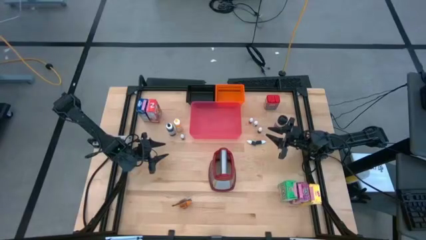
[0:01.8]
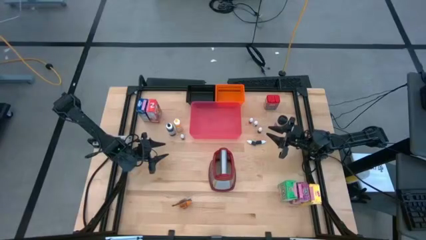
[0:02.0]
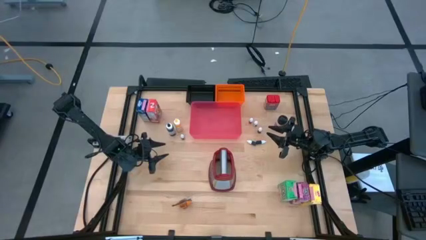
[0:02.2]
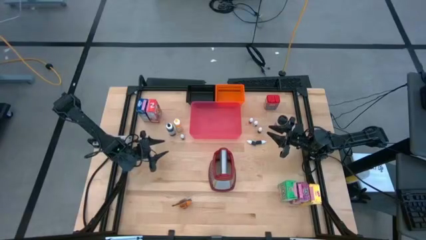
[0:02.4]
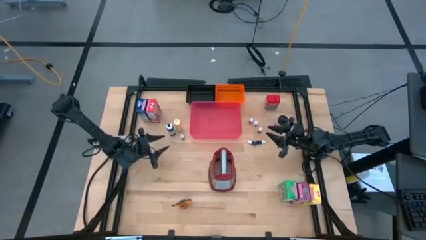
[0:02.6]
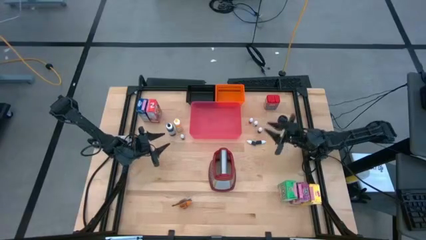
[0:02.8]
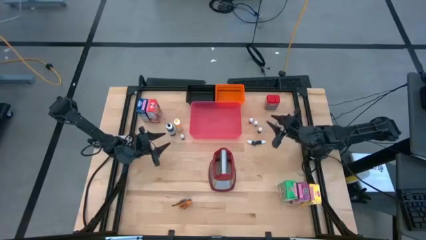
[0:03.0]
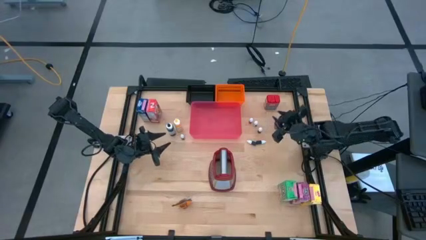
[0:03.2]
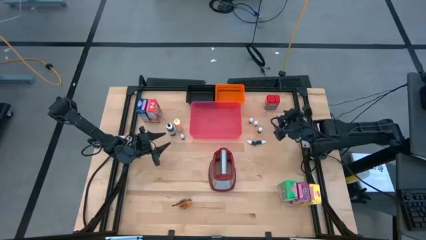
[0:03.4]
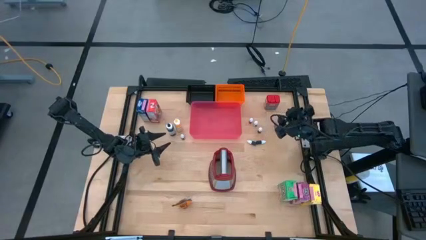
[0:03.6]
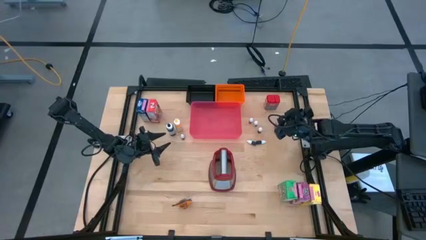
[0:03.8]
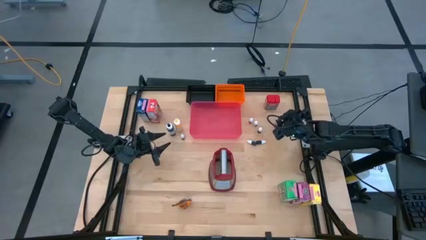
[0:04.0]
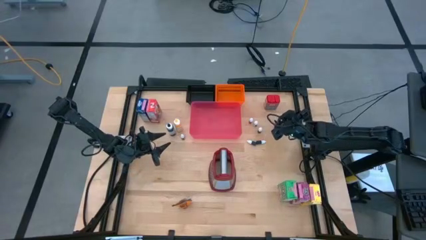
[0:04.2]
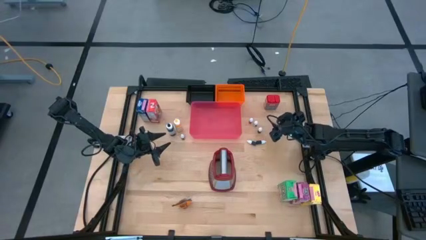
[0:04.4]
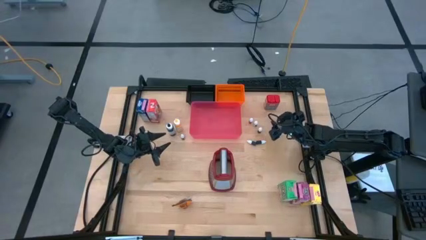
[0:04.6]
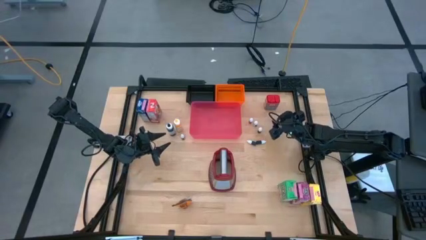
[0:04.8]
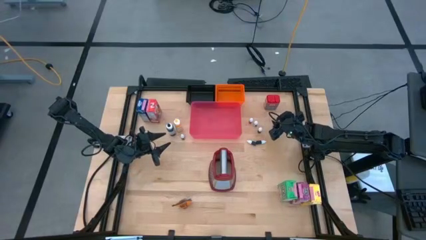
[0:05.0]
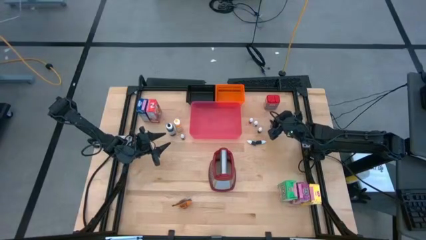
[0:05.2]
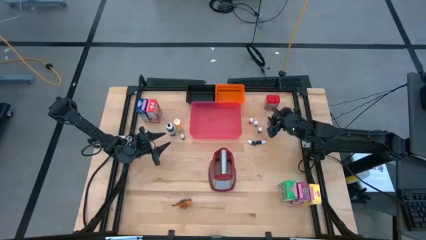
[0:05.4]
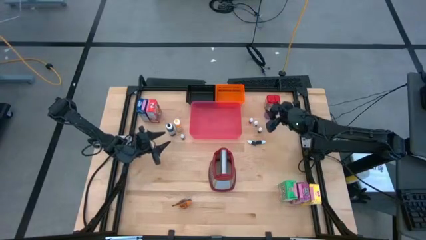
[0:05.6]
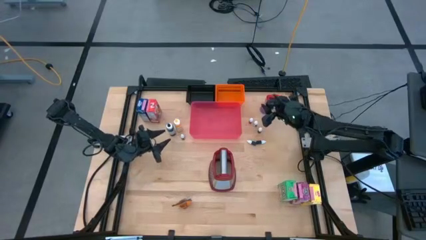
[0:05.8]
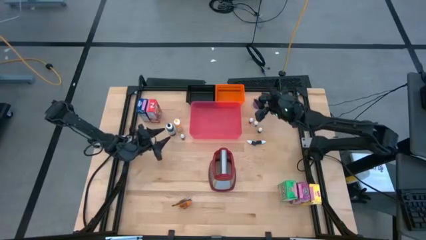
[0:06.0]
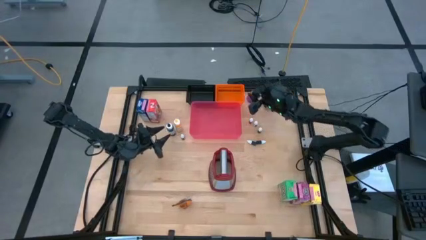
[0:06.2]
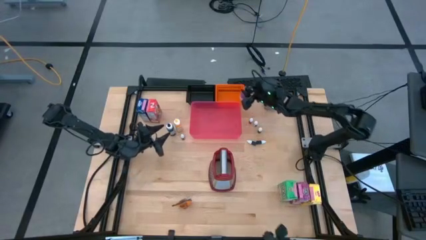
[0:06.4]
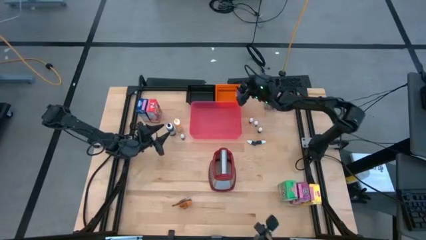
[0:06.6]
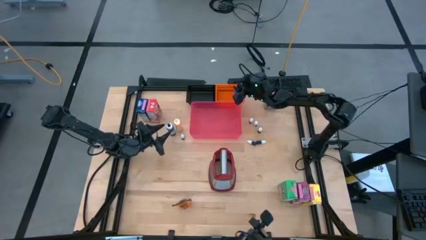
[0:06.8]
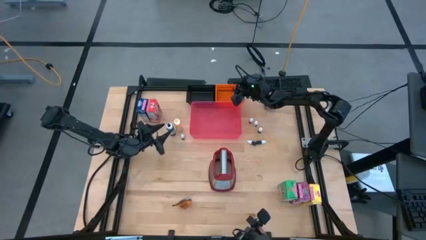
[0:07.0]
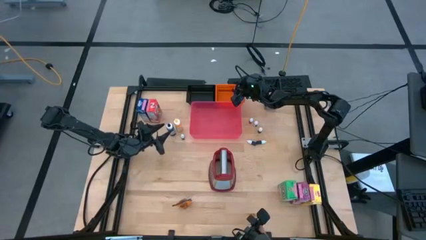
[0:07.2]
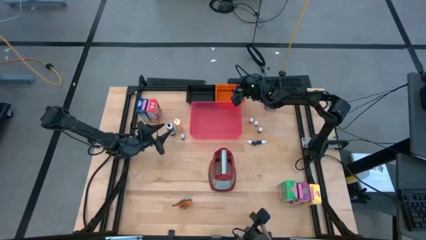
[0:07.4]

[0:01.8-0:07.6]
Task: Pick & Place Kitchen Items
Put the black spice bottle into the orange basket

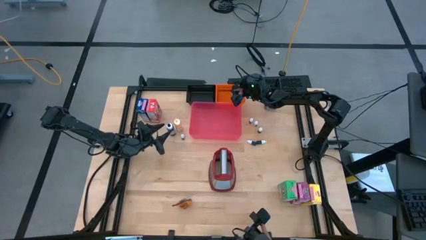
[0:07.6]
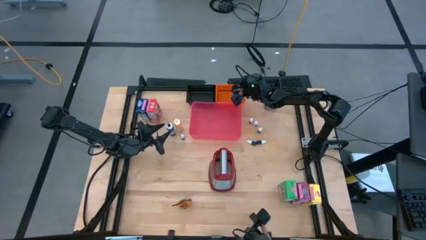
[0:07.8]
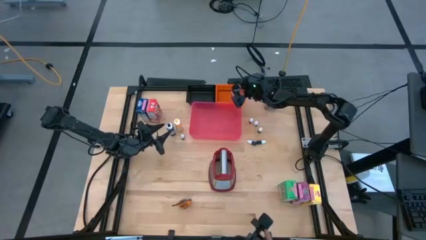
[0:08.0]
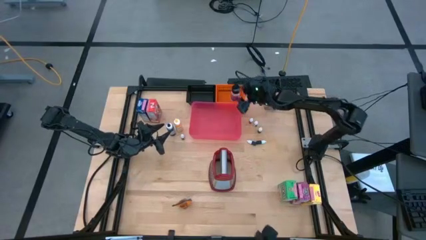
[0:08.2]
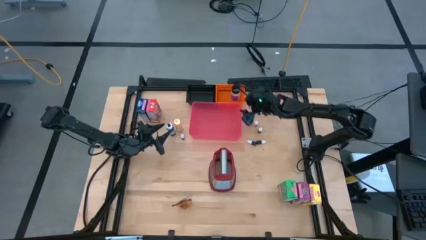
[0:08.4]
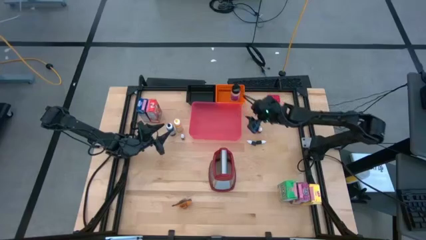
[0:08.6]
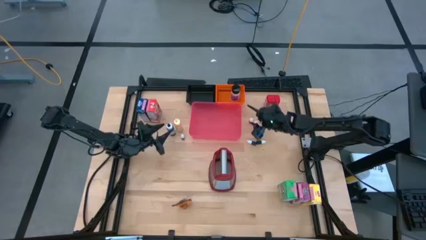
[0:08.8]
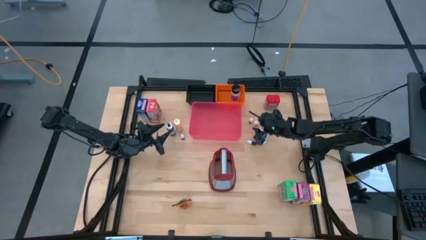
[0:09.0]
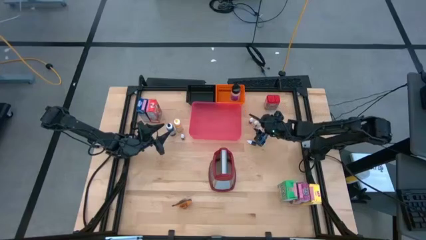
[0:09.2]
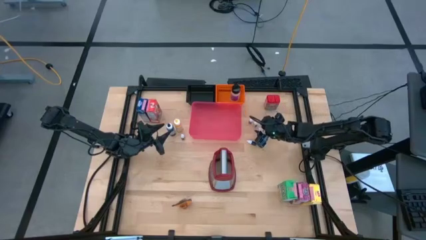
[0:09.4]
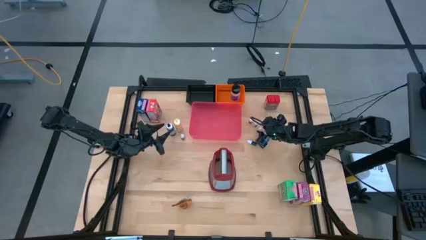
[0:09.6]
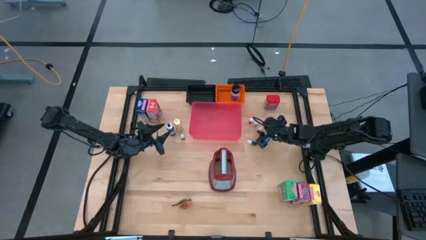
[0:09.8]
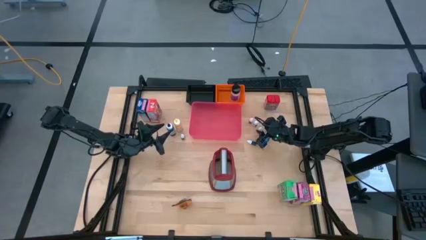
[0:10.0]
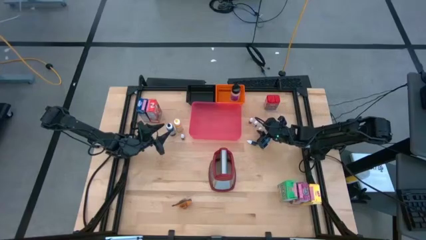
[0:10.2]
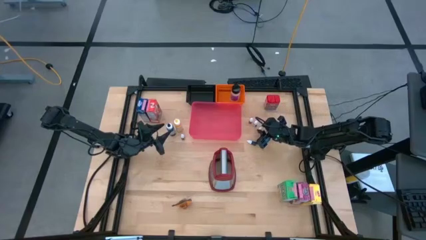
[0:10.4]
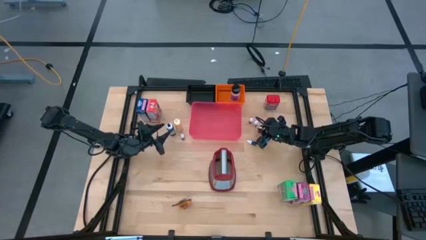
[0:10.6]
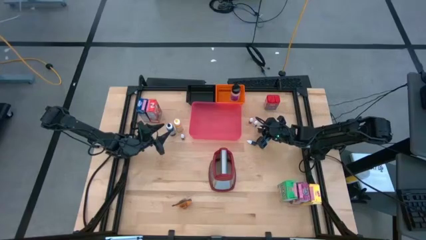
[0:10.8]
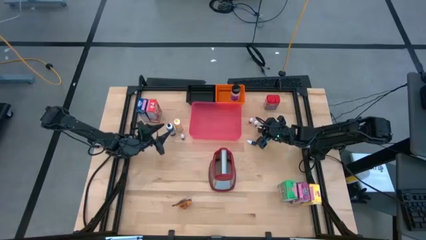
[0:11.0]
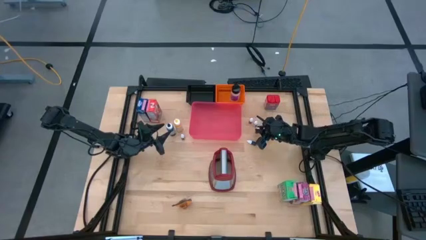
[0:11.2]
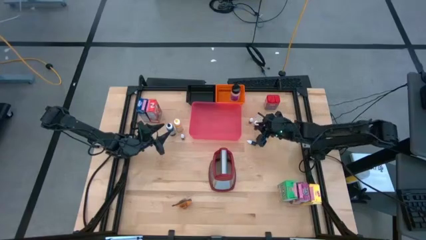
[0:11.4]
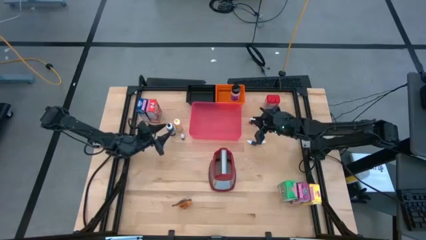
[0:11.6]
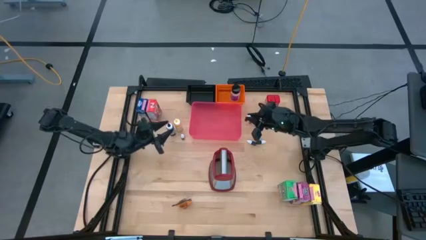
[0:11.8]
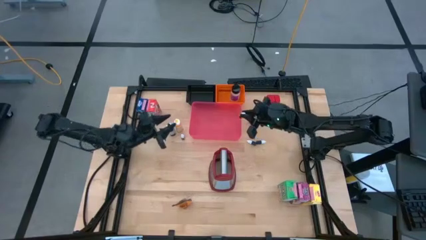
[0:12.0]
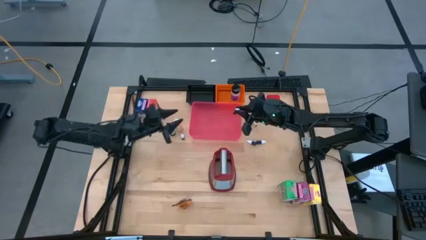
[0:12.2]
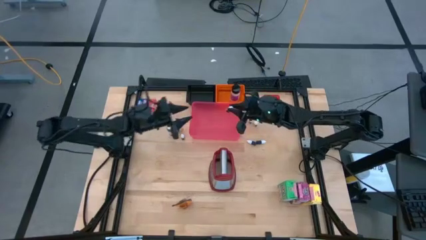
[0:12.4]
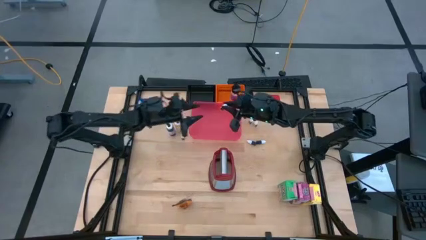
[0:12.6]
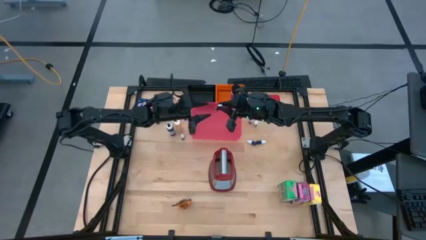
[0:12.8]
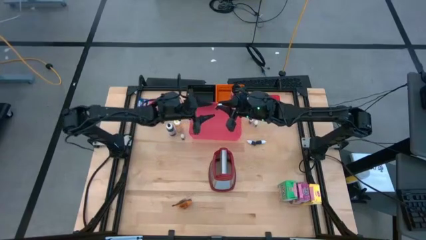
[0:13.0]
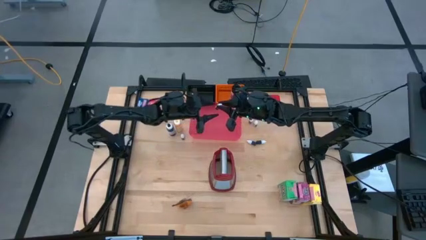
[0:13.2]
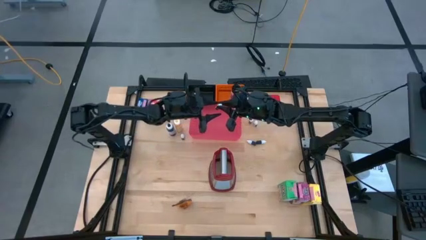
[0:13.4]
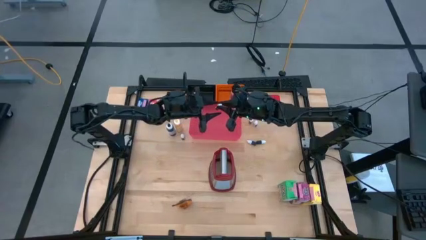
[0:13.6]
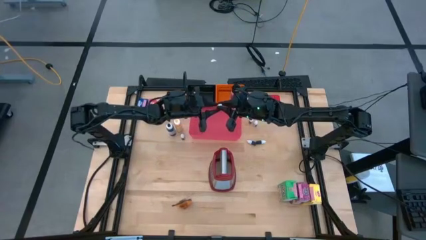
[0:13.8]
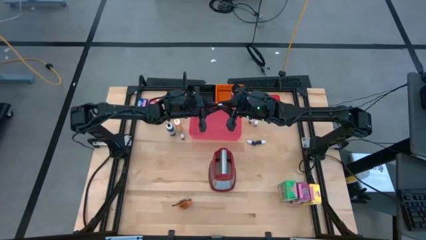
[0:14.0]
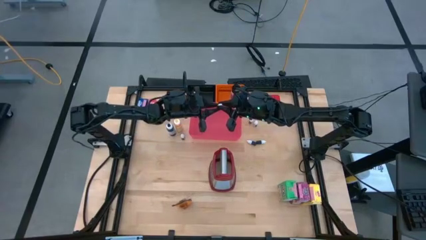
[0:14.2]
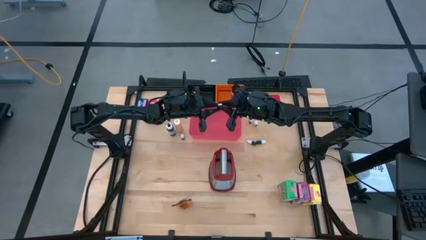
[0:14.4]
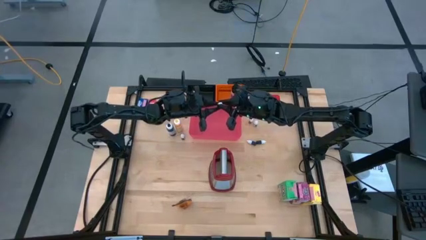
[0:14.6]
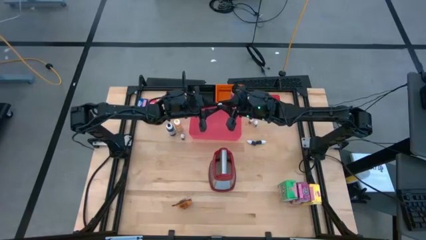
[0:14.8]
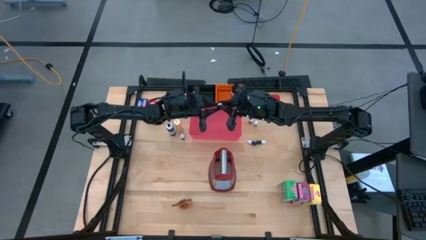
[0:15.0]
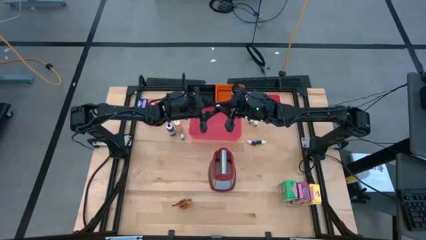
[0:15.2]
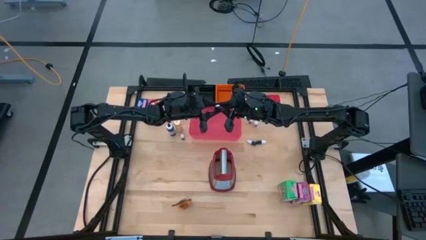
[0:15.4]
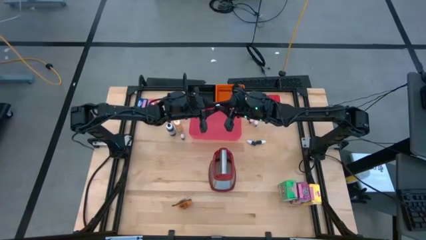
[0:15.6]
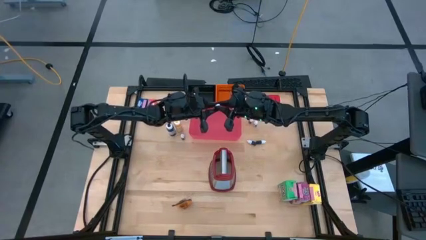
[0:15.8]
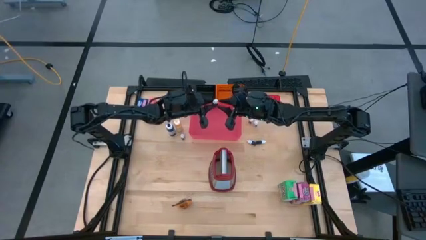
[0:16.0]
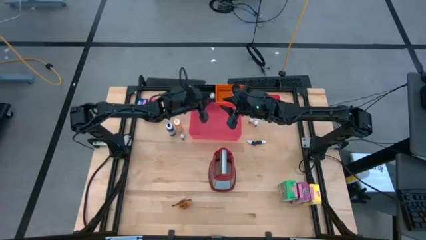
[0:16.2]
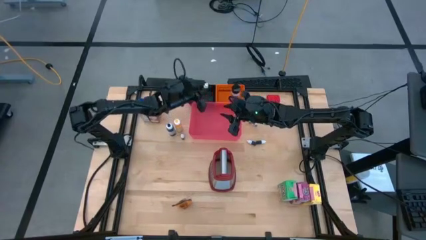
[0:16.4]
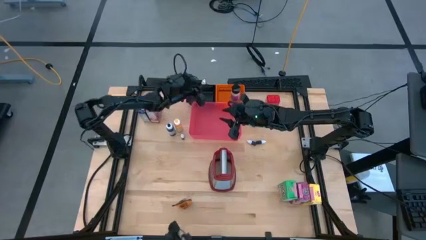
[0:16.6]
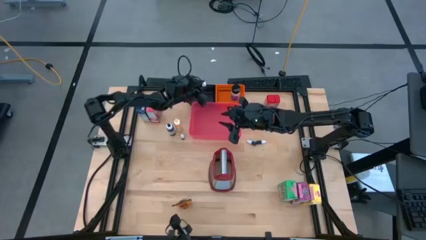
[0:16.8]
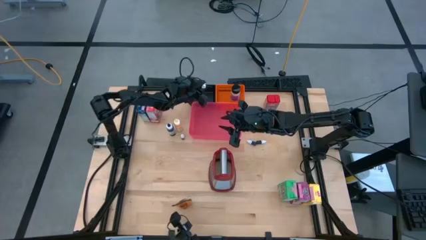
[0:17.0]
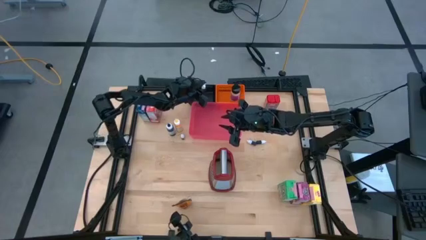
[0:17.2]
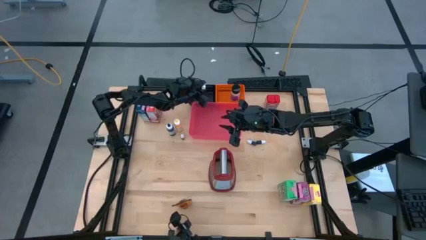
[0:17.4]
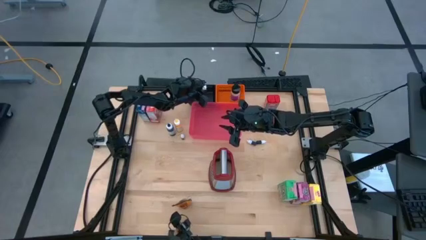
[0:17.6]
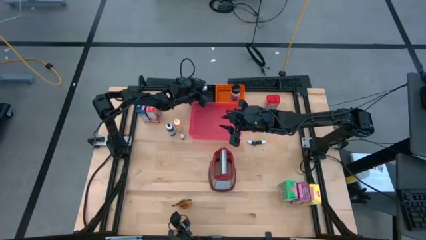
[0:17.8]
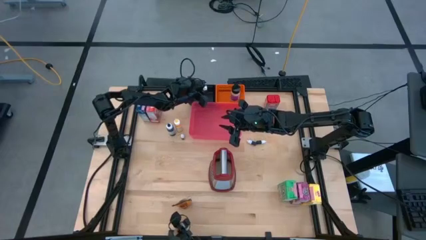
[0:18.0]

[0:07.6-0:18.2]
Put the small brown food coloring bottle into the black basket
